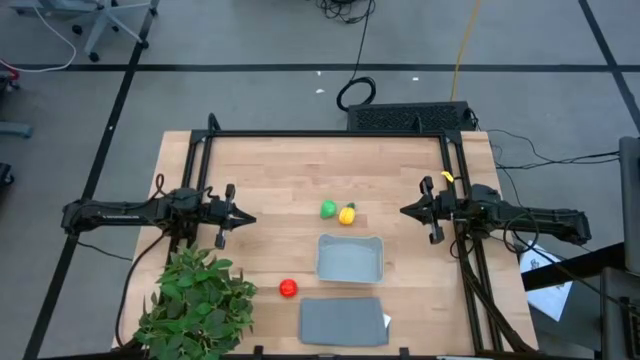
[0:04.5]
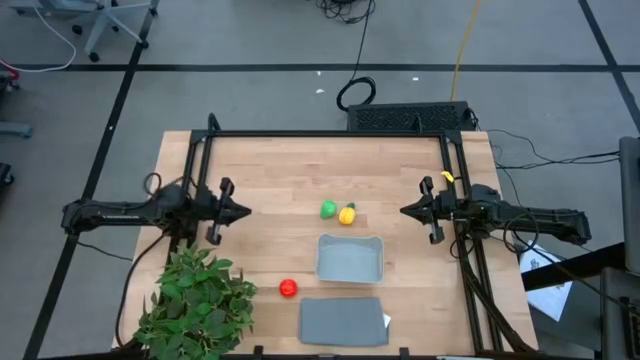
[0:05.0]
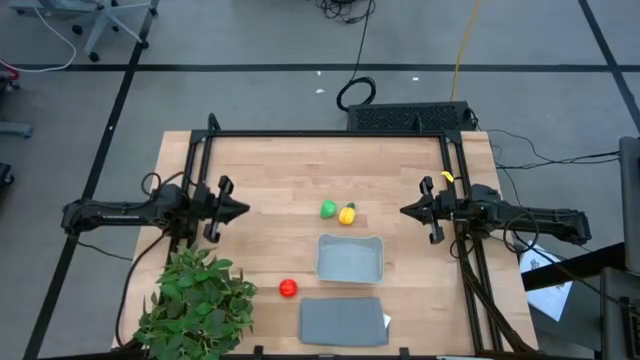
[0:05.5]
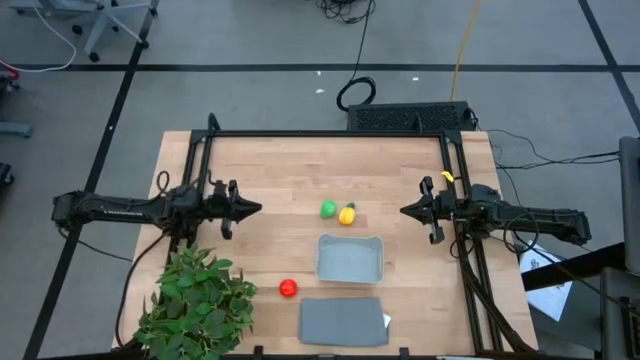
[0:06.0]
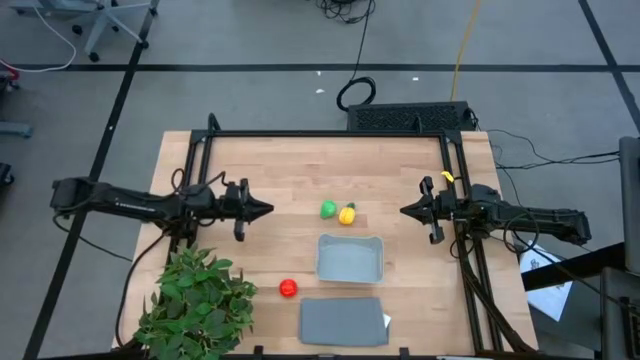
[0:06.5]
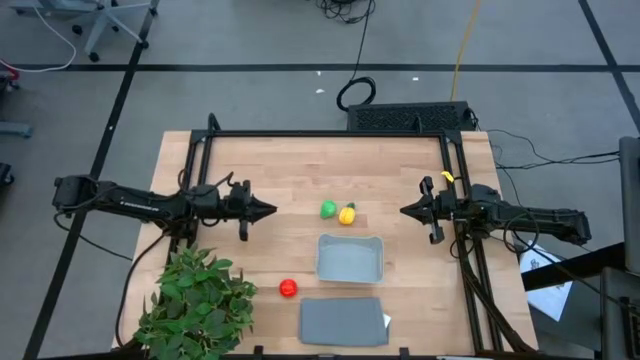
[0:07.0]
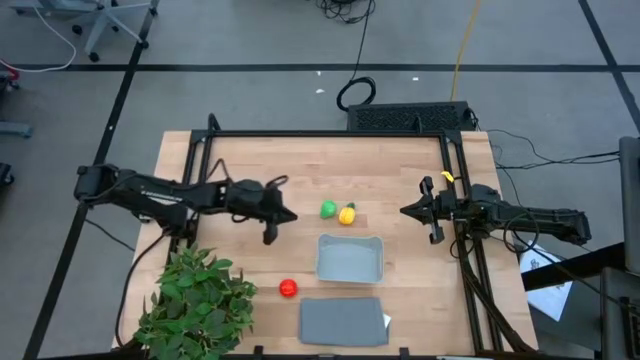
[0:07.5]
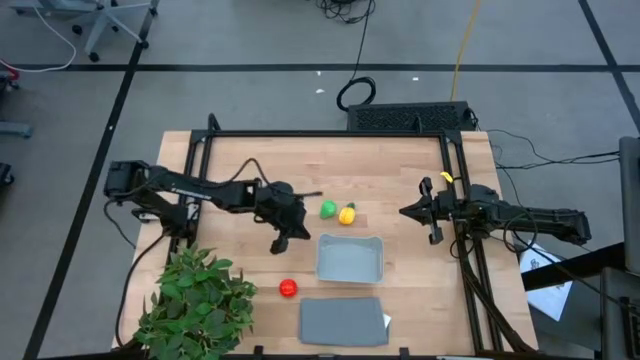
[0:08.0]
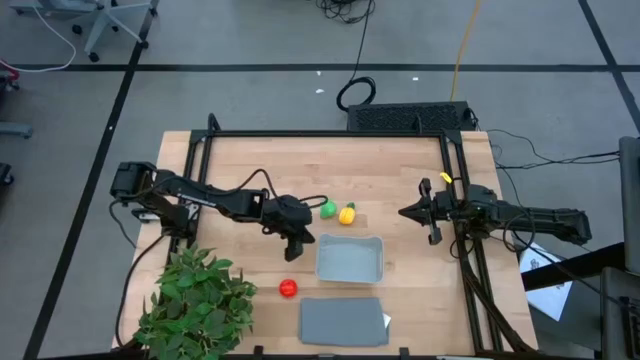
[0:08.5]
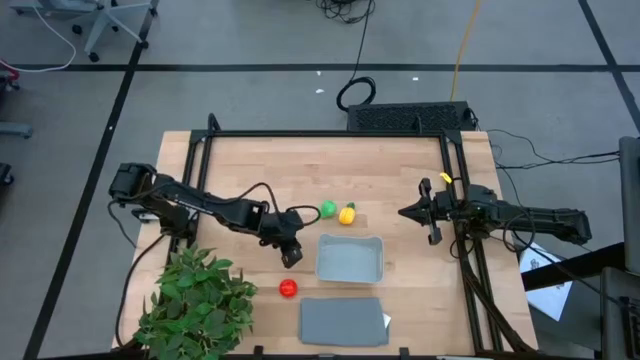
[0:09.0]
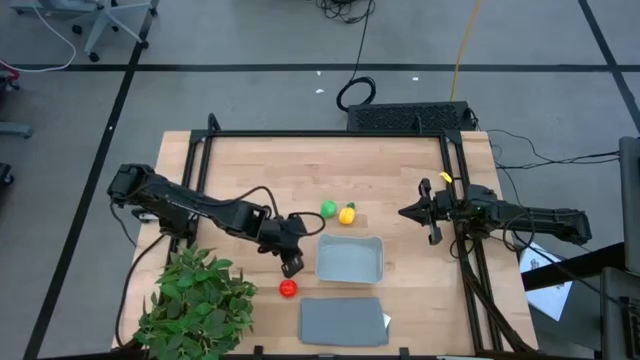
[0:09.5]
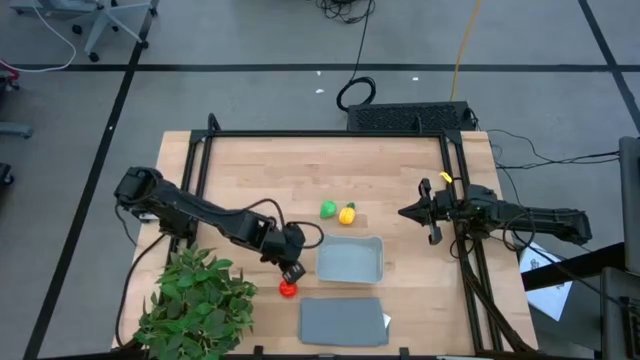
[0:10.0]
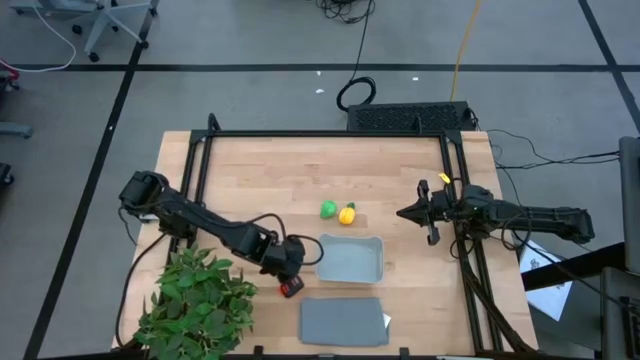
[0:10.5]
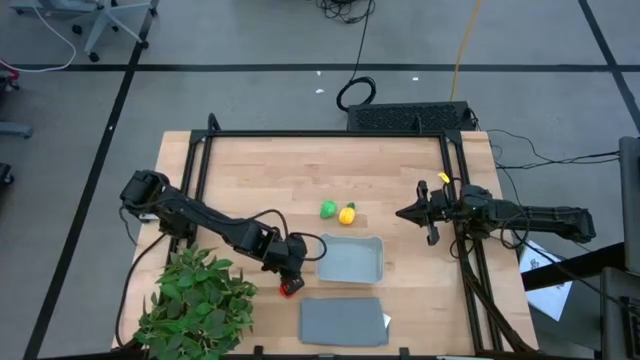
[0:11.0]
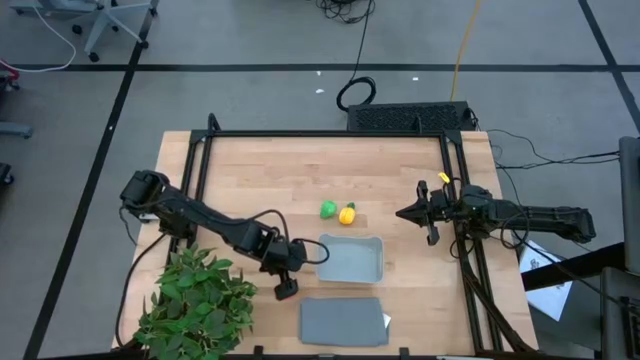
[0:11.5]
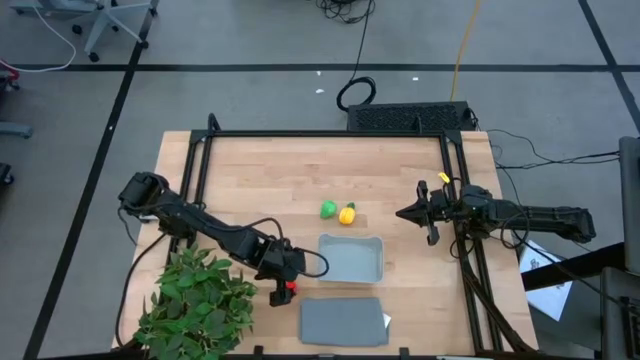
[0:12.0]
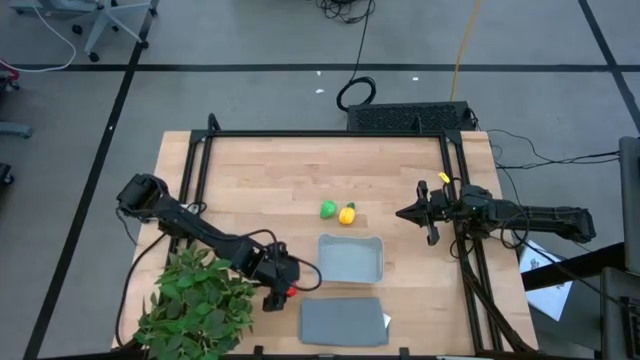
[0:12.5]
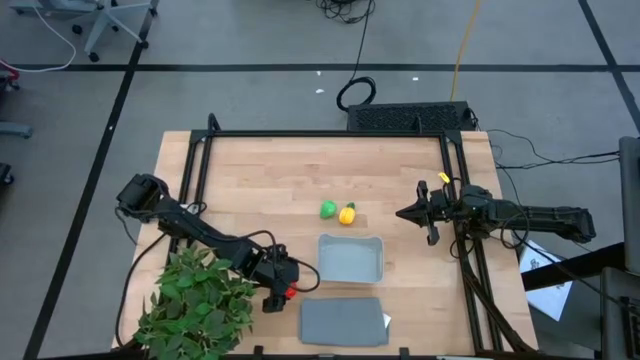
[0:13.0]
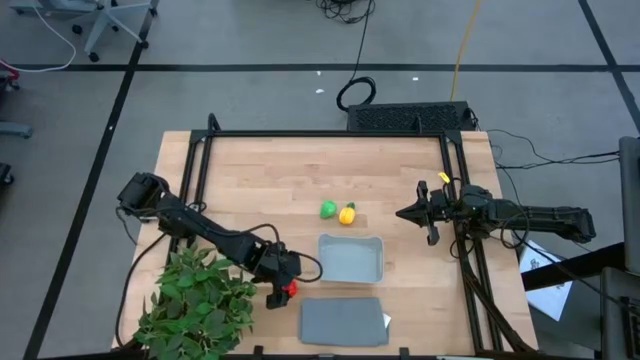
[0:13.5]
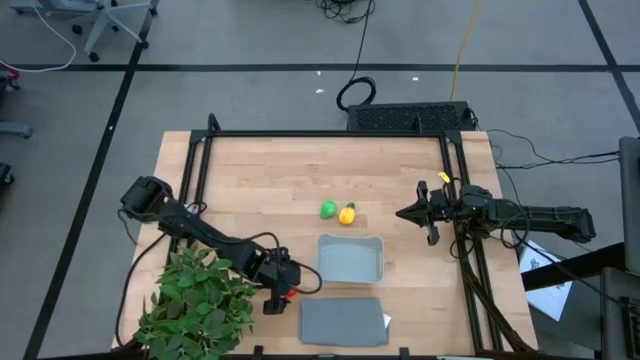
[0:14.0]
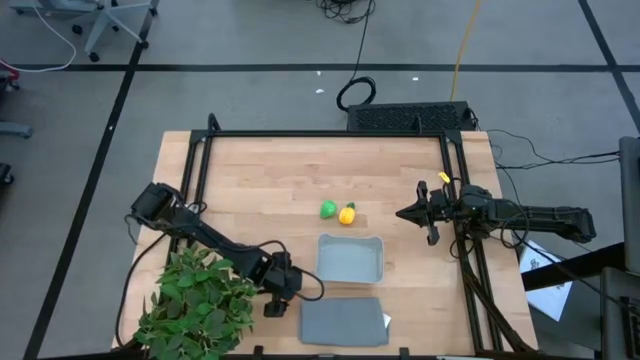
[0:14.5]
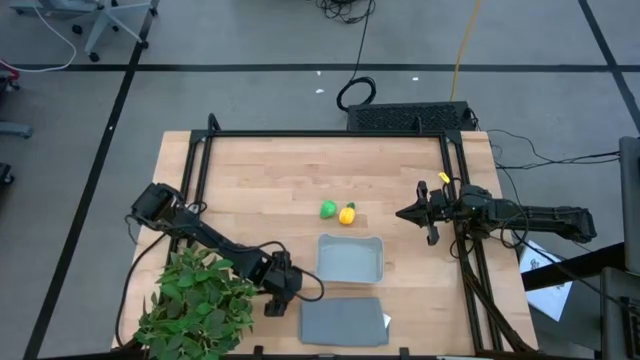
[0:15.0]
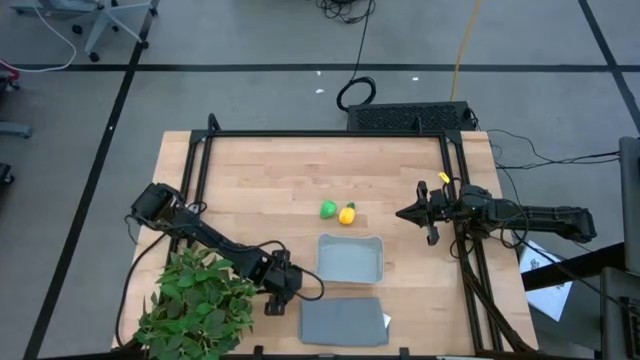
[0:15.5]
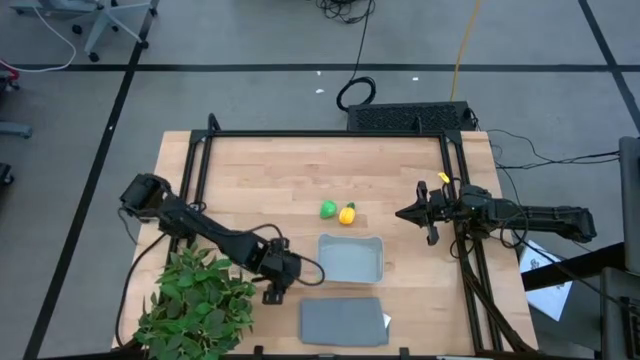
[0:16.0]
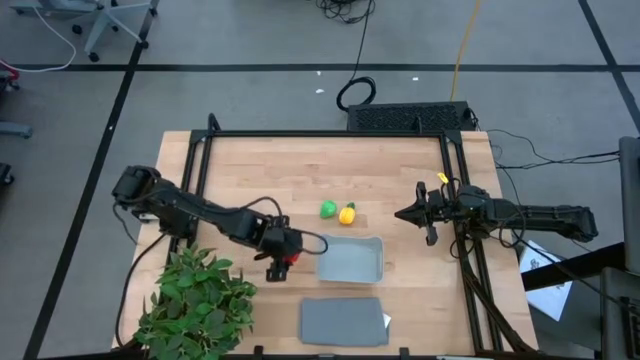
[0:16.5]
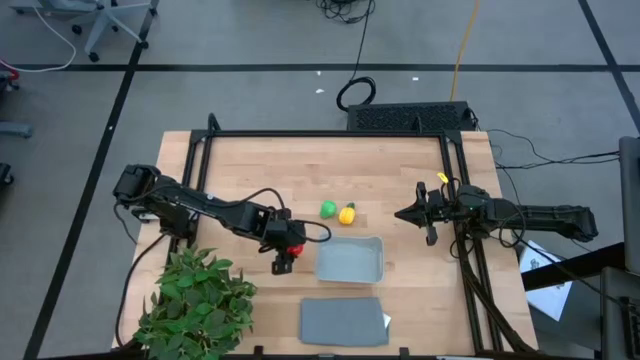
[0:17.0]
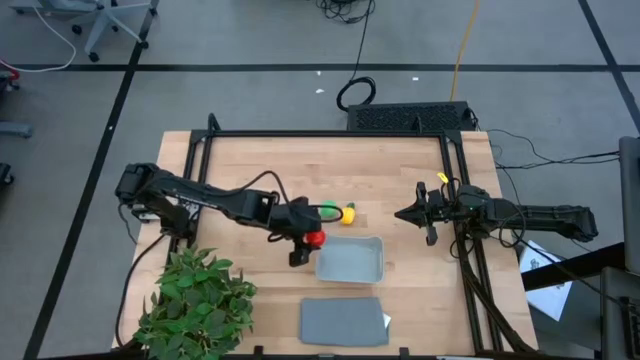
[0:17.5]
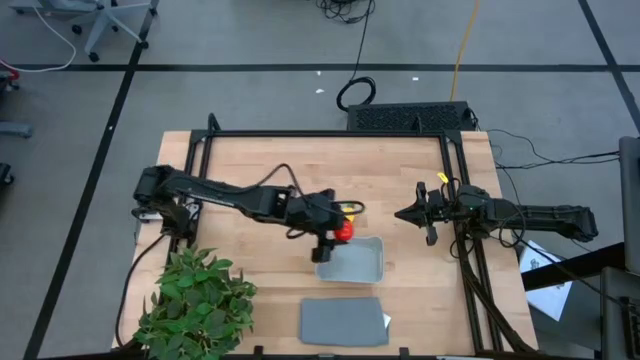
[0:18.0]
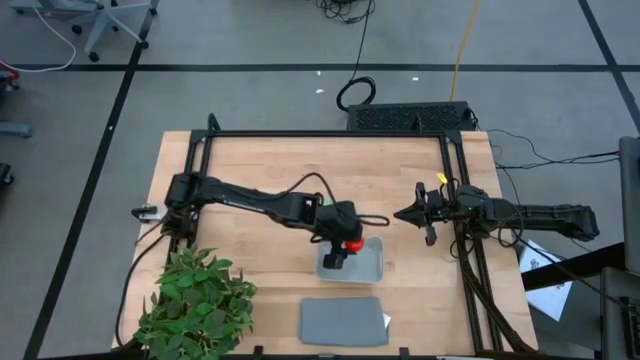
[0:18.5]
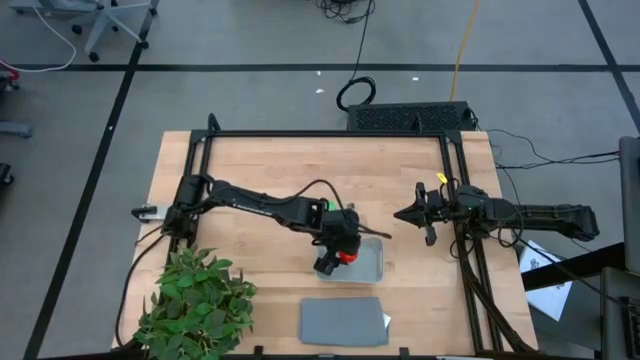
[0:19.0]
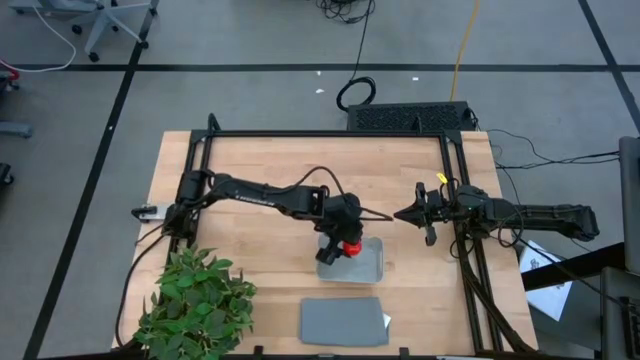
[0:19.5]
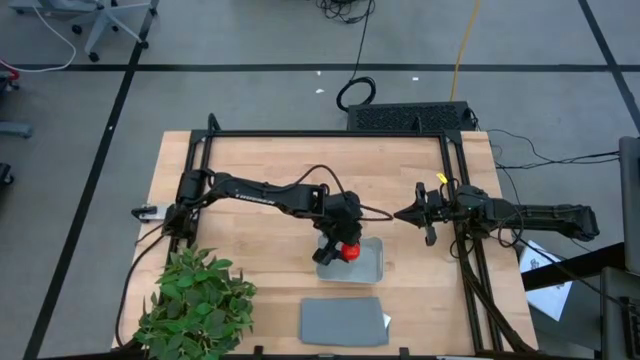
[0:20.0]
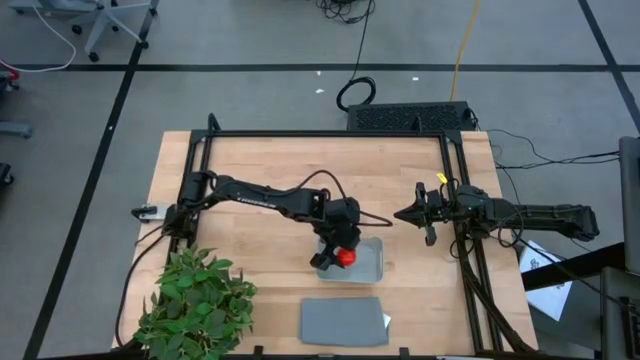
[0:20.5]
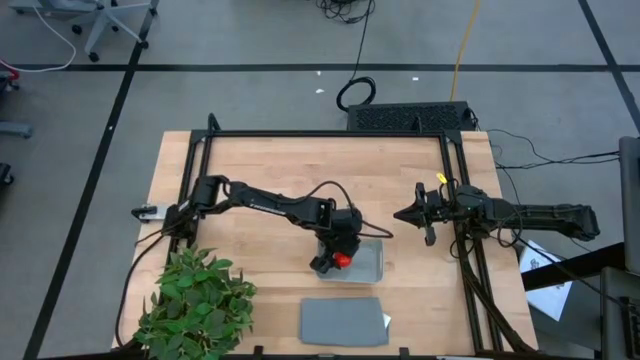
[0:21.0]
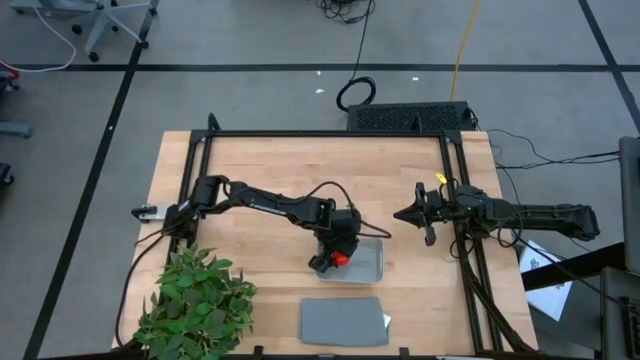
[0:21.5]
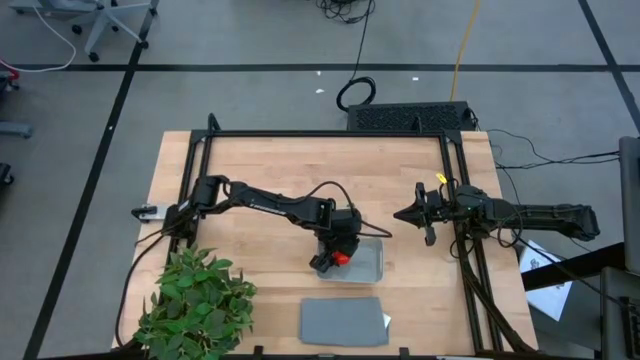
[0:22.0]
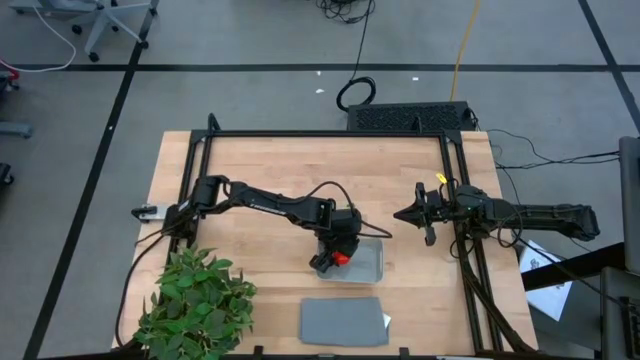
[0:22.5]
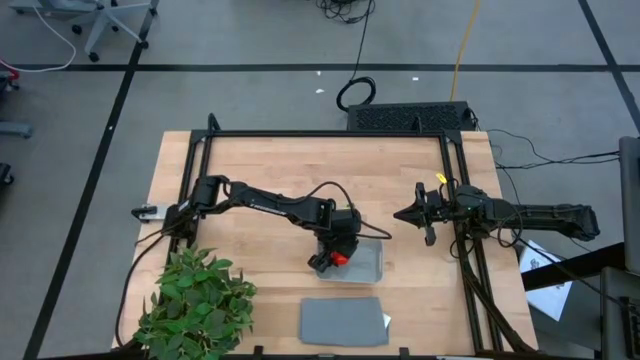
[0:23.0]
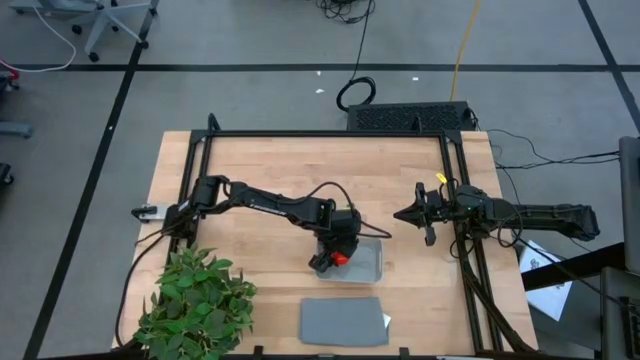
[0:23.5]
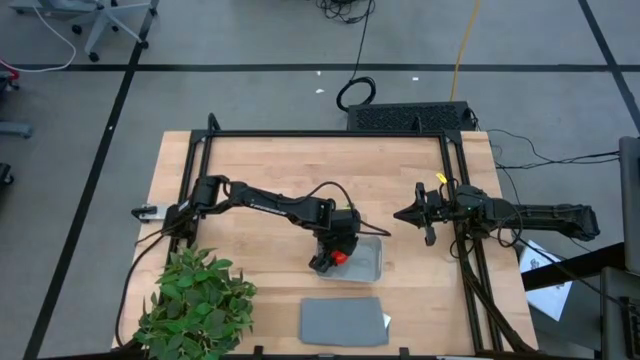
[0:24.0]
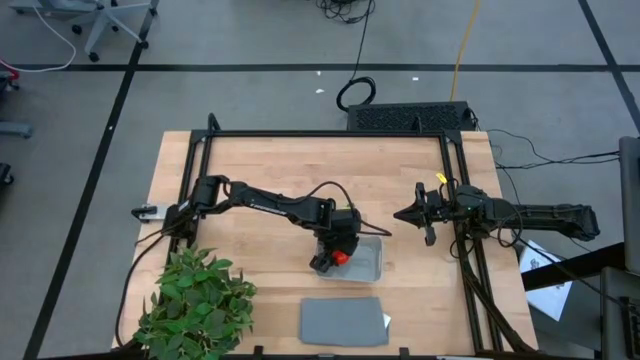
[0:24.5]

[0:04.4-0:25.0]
Task: Pick and placing Produce into tupperware
Put the red tomato into the gray bin
